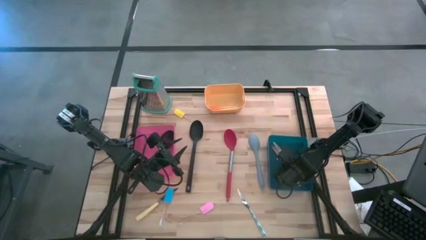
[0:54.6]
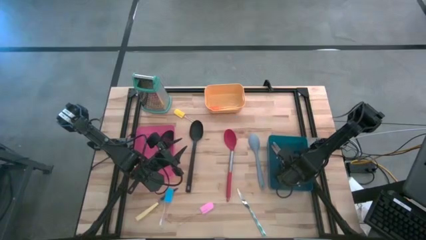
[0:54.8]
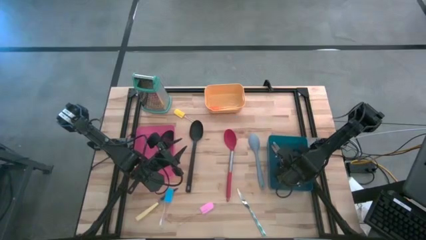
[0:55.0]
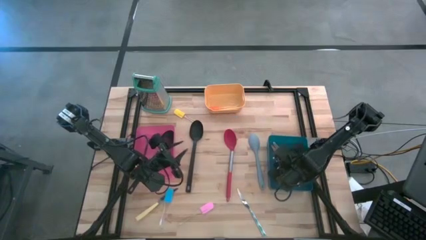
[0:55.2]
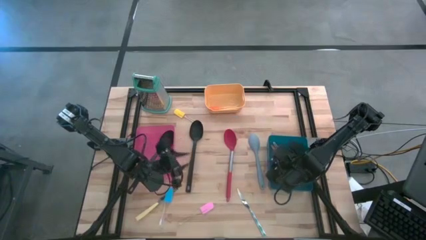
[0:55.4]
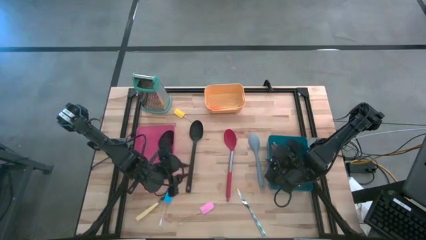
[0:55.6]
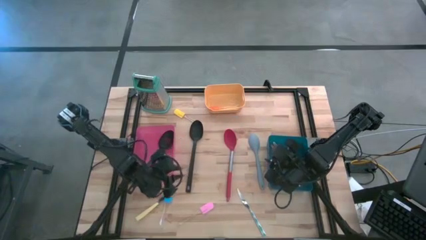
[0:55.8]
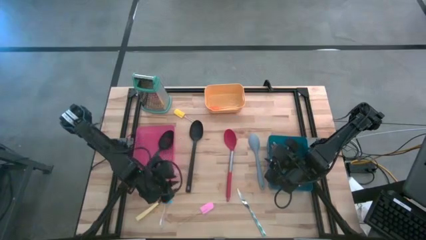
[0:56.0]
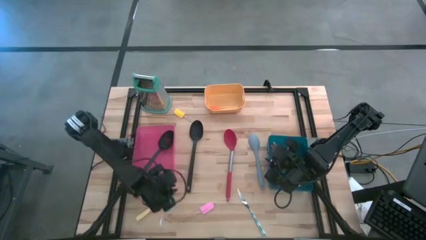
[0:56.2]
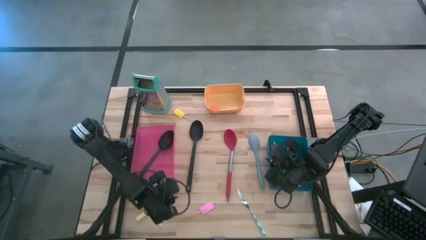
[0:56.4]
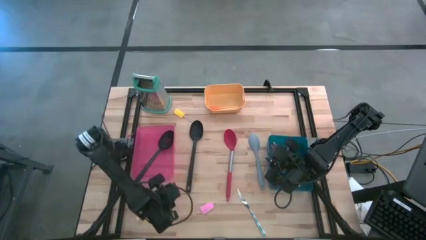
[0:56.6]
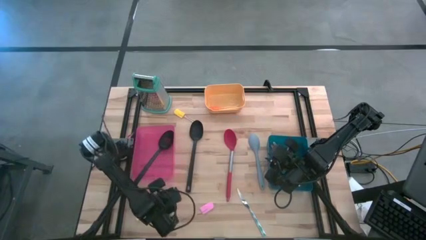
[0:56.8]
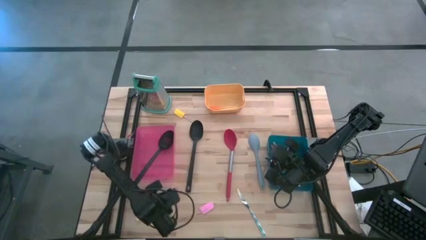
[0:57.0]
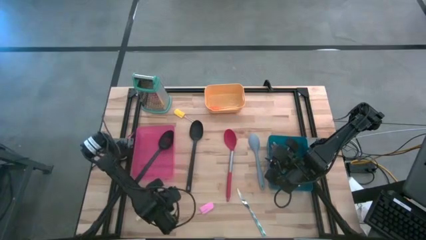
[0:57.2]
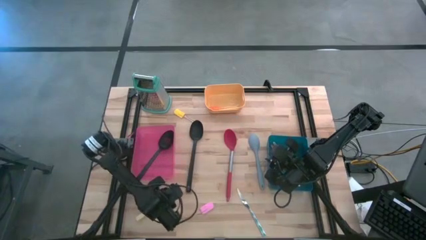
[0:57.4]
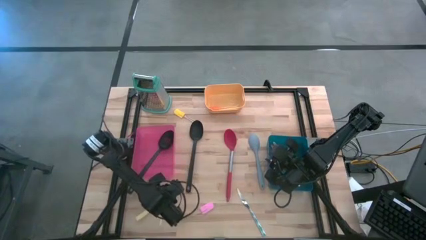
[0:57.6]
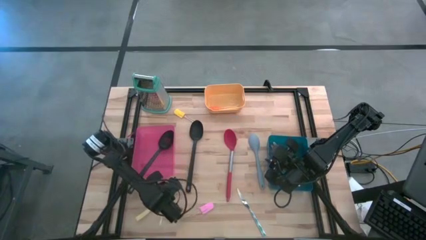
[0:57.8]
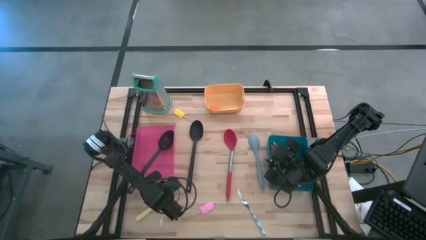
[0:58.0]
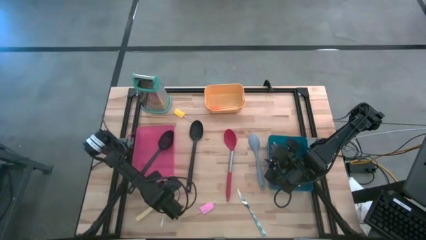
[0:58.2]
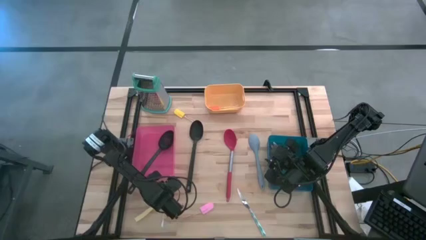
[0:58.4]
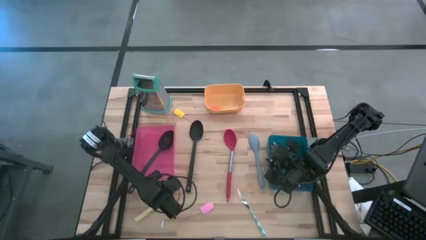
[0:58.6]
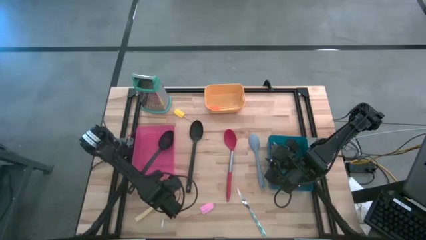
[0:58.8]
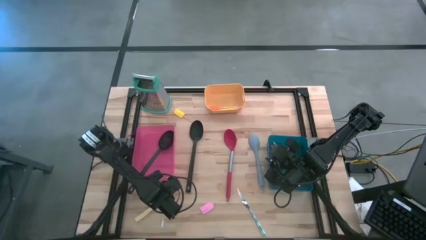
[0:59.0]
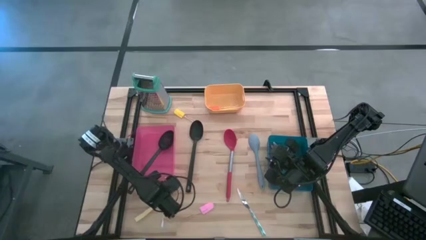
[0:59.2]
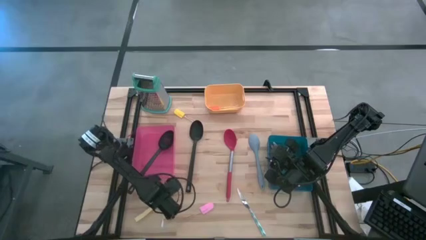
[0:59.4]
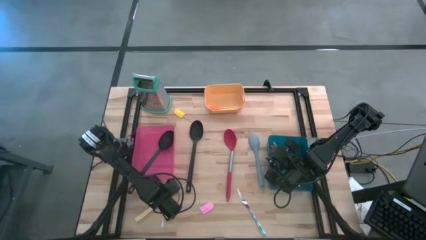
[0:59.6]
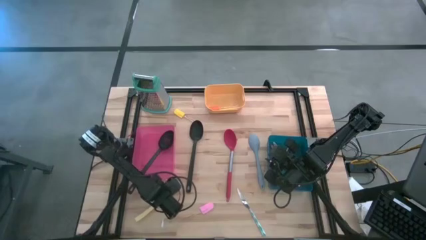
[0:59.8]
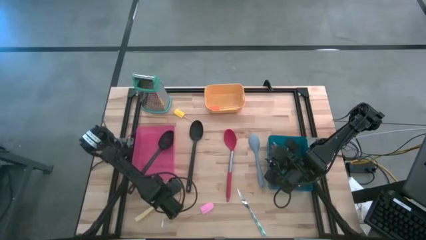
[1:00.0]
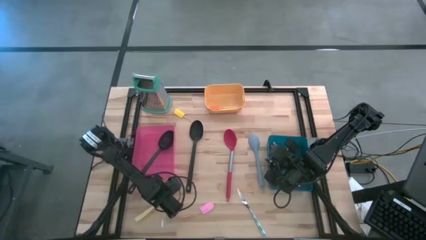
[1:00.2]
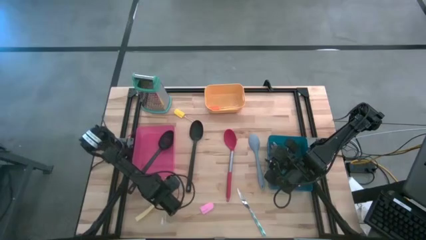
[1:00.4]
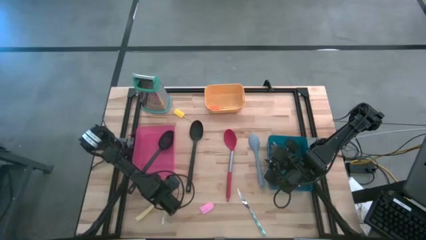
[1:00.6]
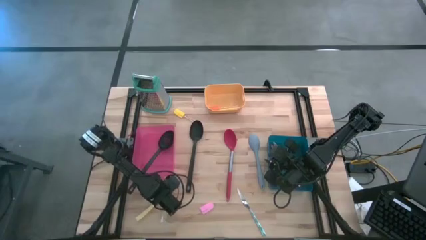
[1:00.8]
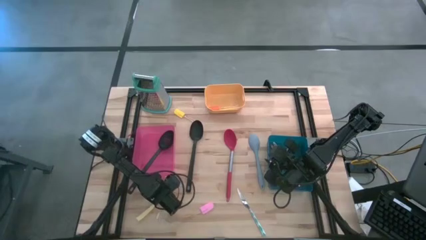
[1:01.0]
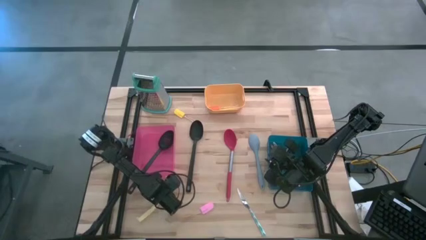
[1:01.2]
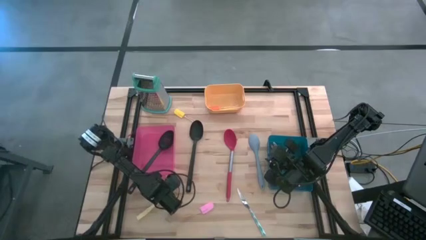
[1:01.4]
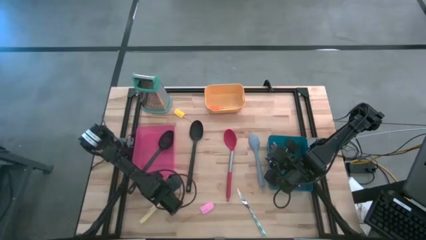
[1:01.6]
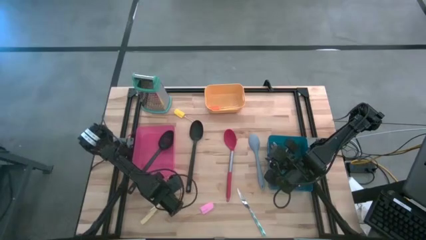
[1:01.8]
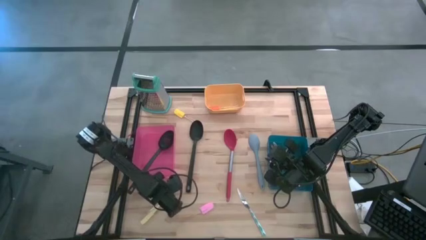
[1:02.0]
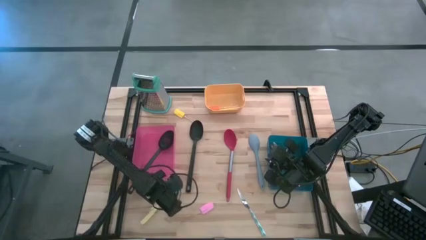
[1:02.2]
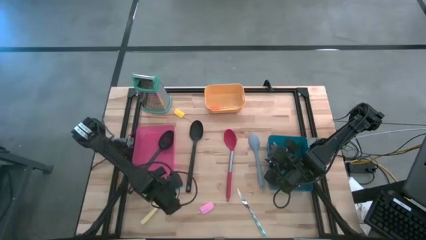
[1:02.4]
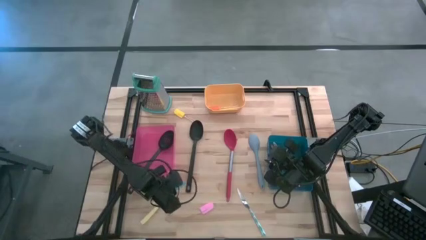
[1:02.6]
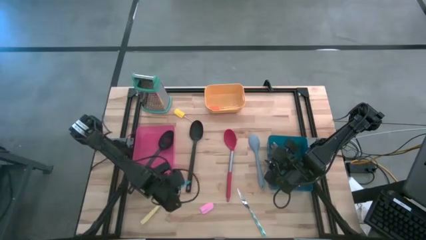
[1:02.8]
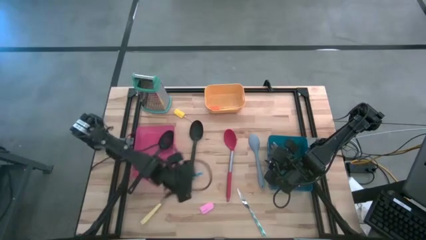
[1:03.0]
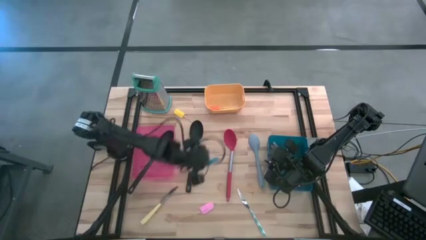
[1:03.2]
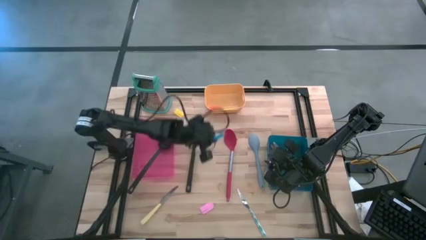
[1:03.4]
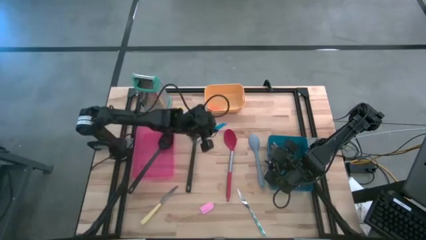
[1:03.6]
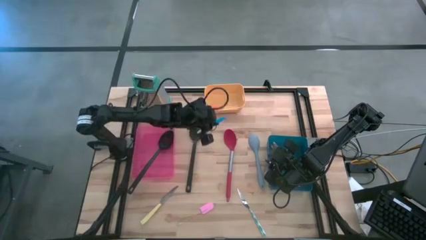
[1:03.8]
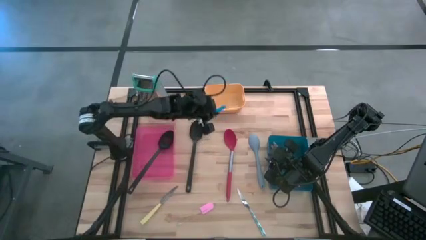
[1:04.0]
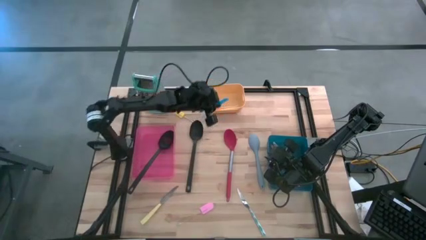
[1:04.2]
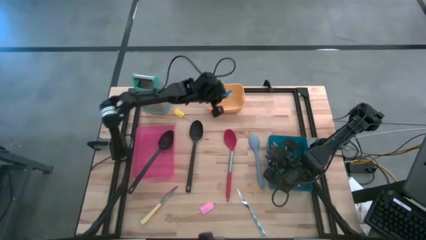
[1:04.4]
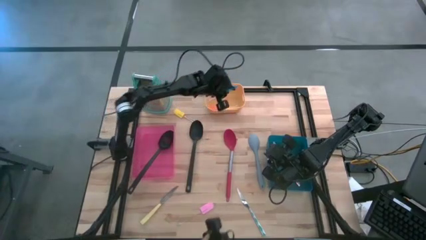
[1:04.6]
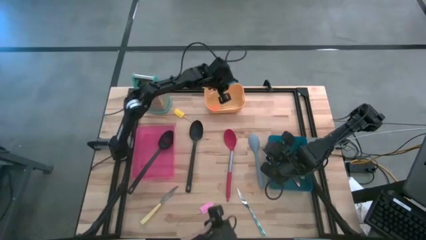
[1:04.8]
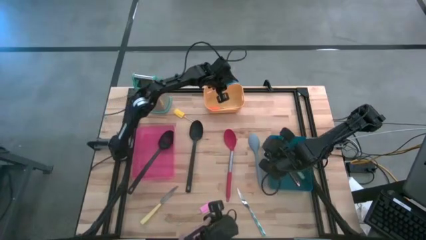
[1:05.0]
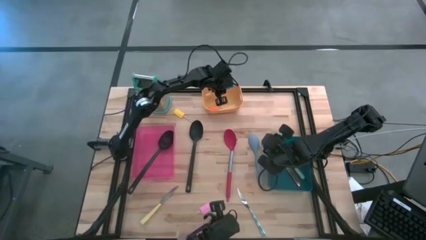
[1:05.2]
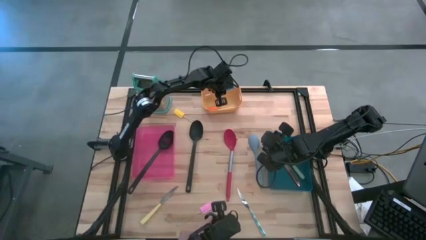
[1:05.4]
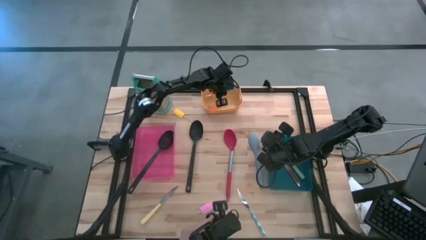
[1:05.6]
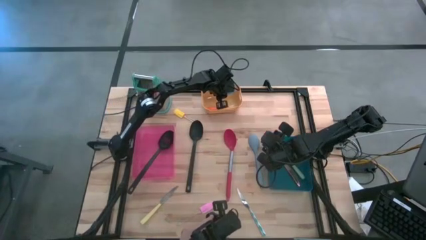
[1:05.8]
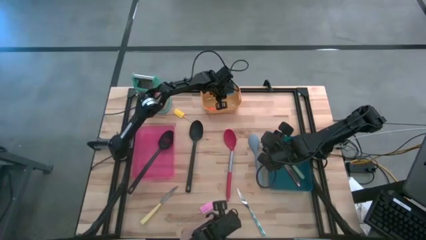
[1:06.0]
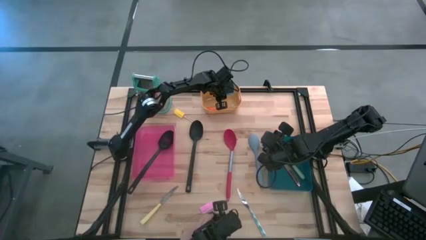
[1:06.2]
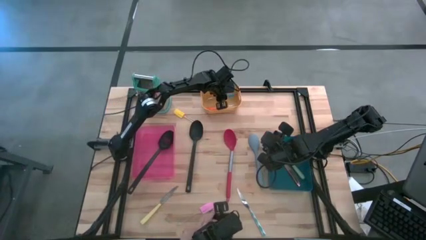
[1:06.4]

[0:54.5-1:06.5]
Task: Pick & Place Kitchen Items
Put the blue spatula into the yellow bin

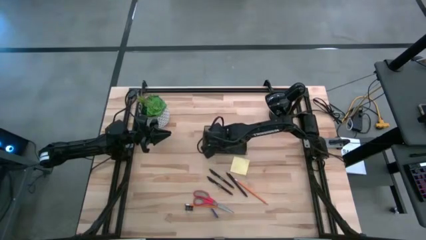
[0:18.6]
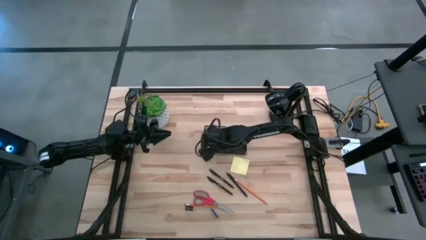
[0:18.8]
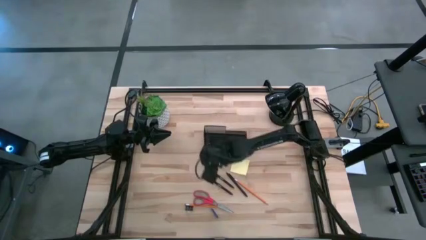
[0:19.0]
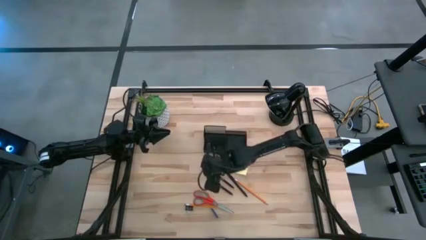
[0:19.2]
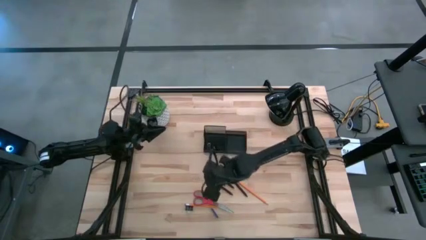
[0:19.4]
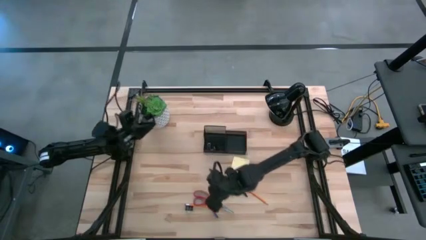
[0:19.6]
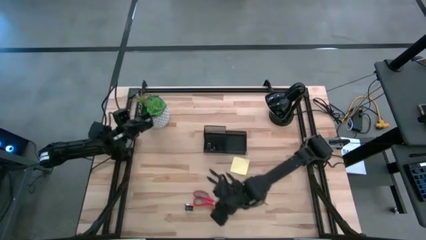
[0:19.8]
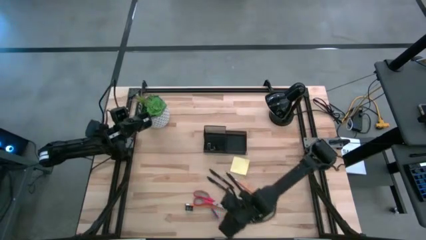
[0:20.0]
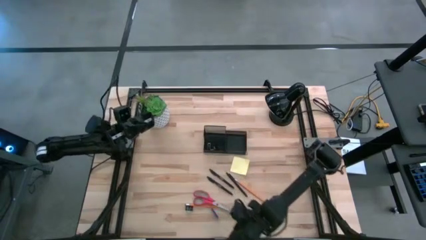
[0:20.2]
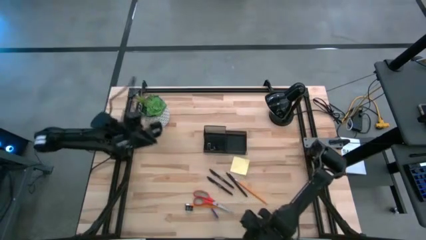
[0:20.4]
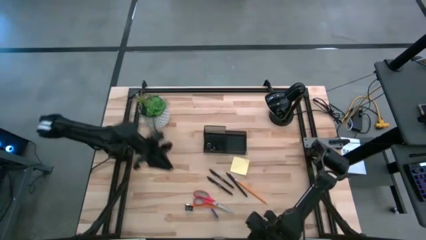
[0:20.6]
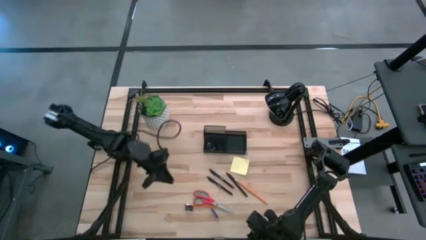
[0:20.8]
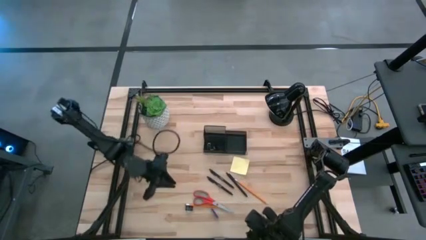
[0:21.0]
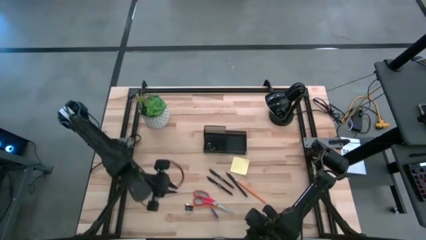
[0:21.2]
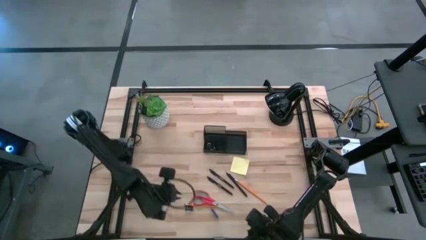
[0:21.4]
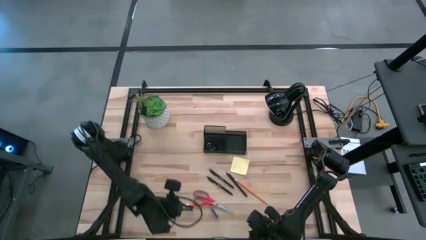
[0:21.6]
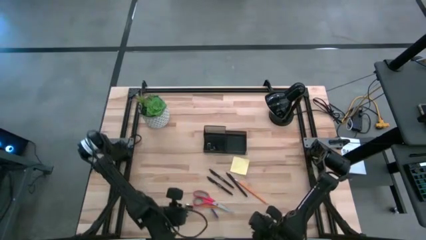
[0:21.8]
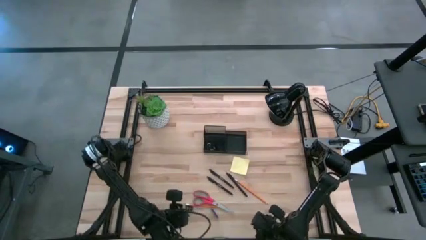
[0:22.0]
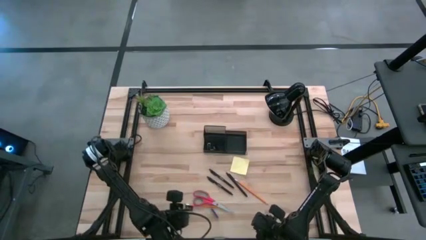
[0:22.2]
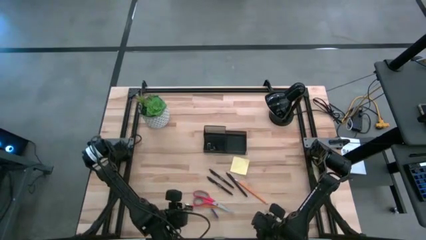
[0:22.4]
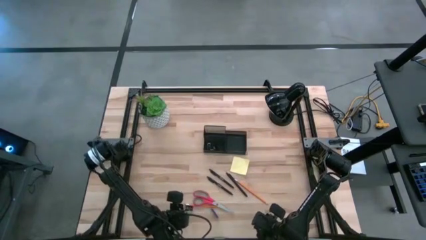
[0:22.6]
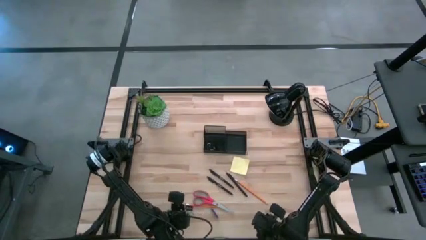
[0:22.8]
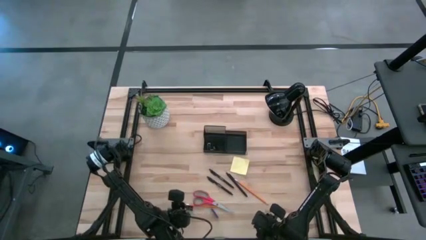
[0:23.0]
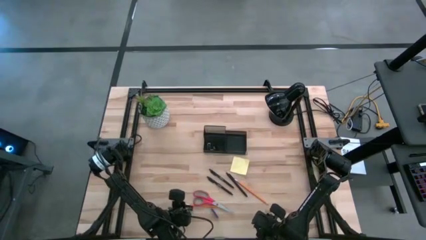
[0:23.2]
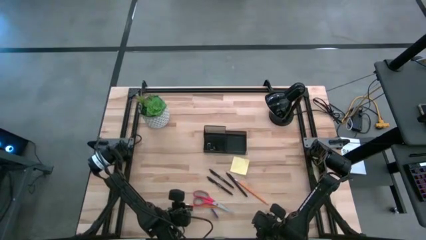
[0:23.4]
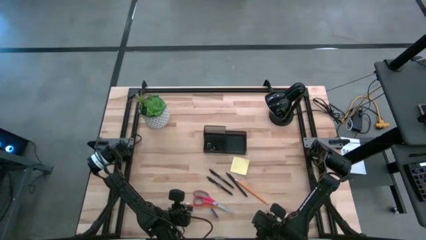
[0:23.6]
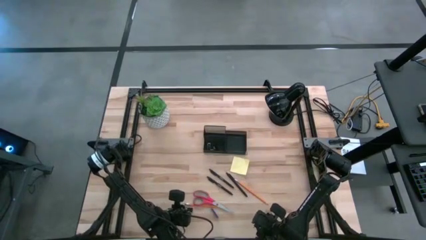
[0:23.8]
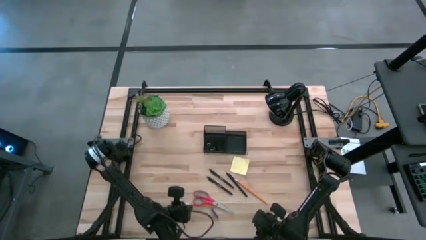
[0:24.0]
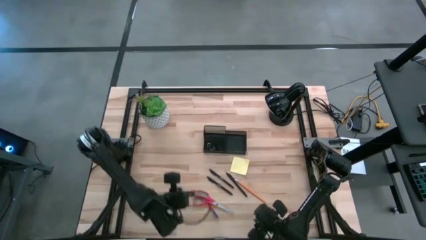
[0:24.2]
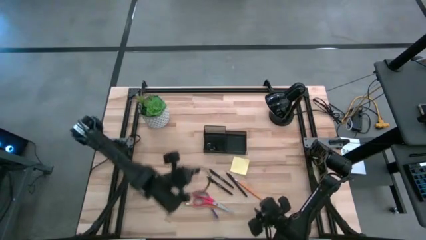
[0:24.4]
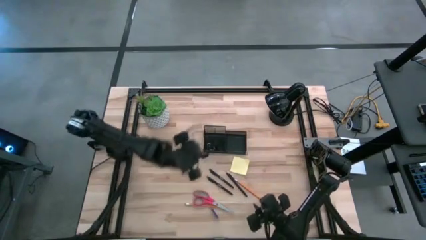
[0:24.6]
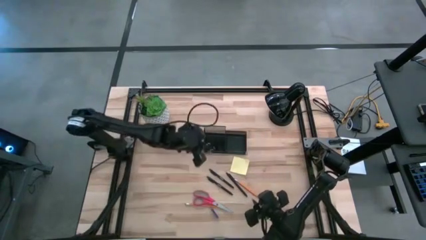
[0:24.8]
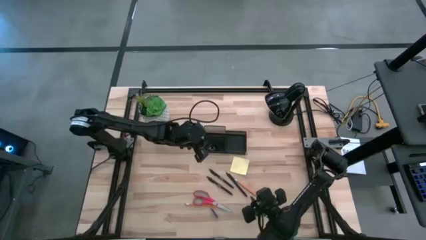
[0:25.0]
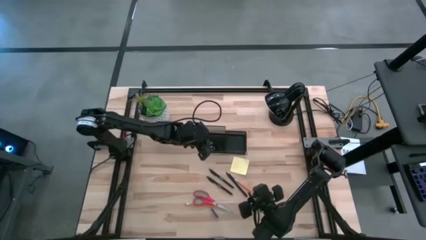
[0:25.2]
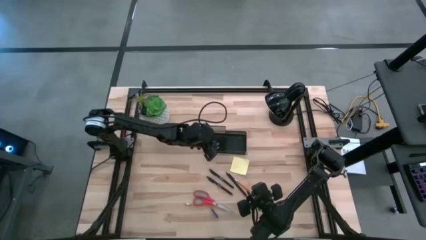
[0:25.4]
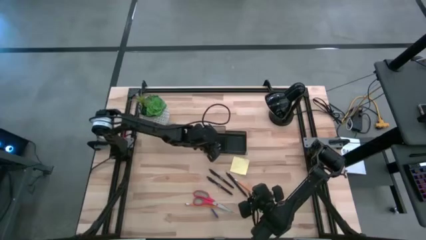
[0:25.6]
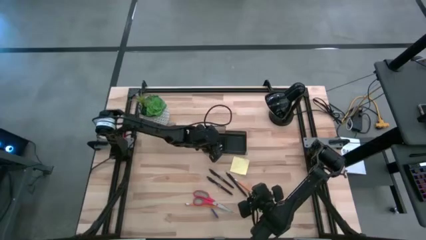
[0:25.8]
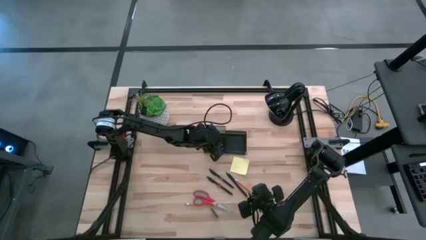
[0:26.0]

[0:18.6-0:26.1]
Task: Pick and place office supplies into organizer
Put the black binder clip into the black desk organizer
